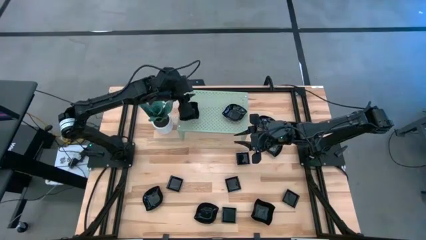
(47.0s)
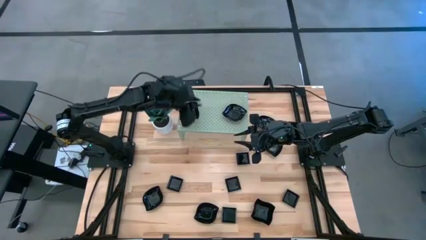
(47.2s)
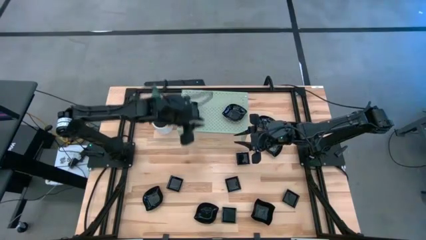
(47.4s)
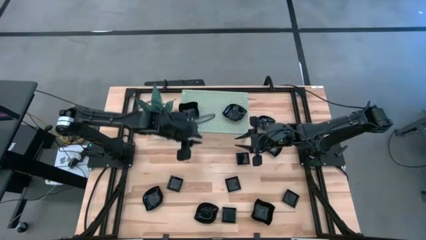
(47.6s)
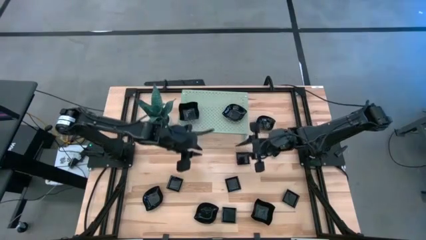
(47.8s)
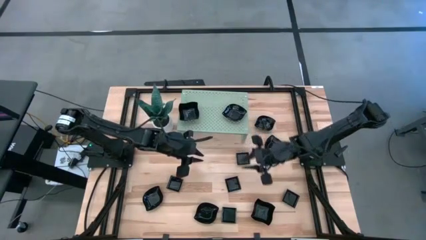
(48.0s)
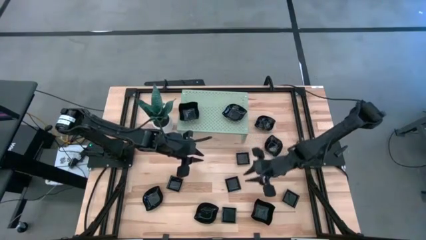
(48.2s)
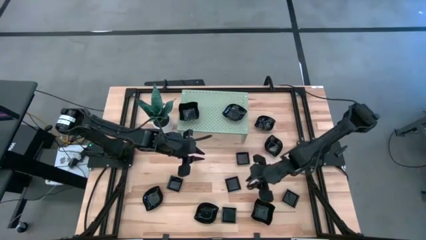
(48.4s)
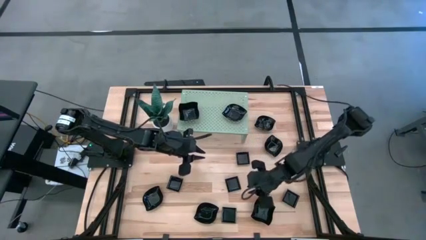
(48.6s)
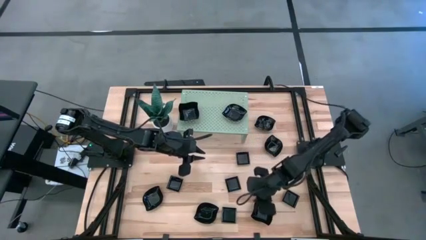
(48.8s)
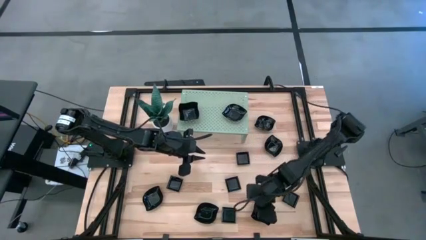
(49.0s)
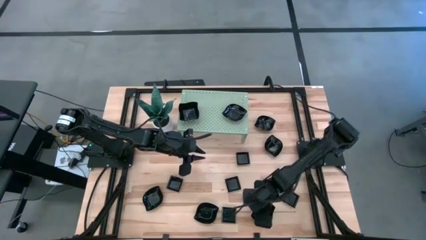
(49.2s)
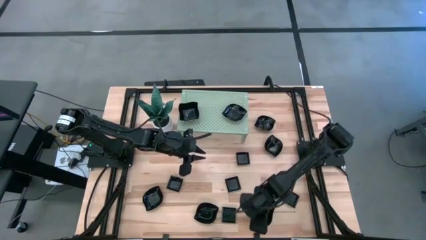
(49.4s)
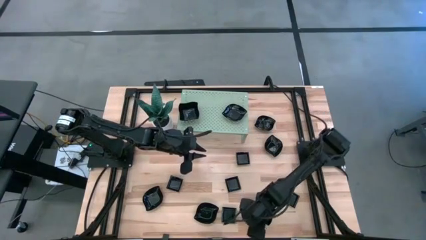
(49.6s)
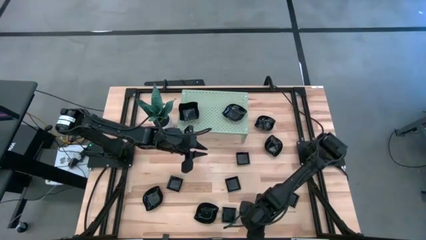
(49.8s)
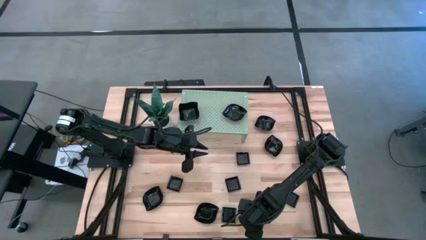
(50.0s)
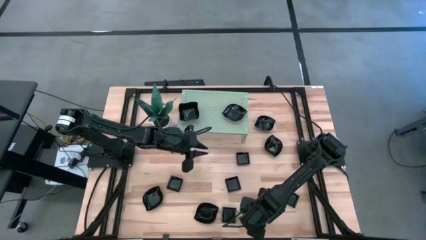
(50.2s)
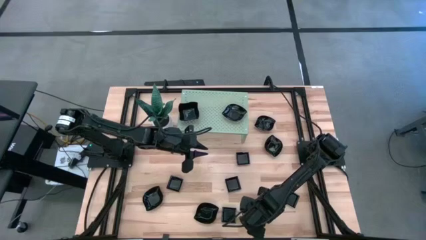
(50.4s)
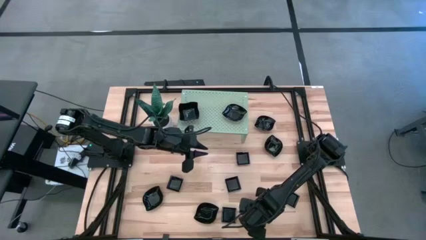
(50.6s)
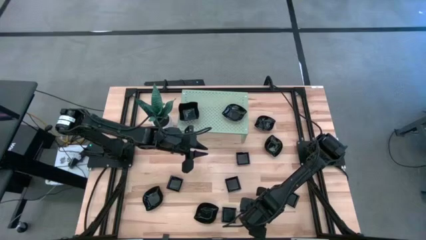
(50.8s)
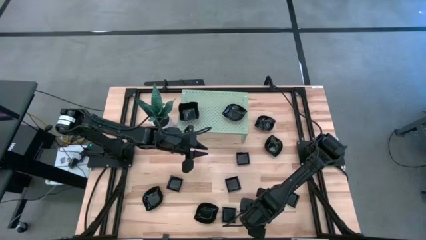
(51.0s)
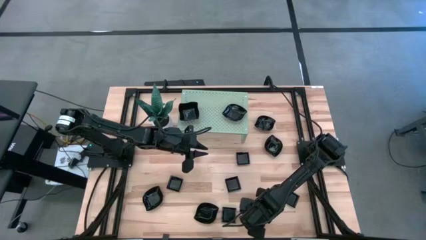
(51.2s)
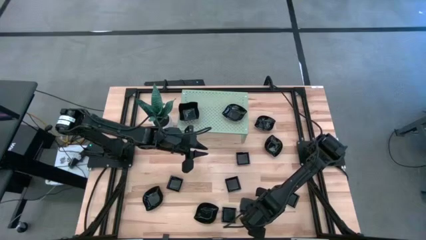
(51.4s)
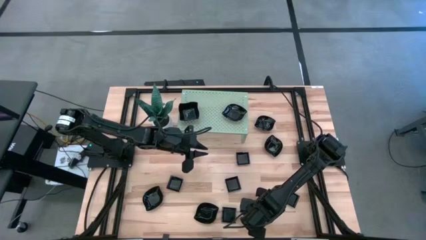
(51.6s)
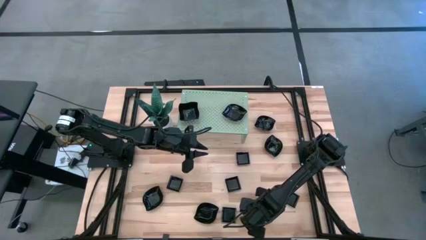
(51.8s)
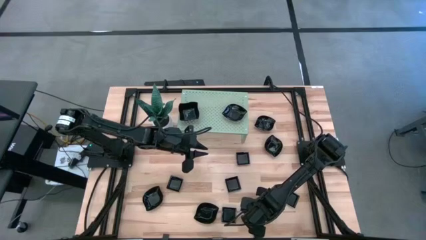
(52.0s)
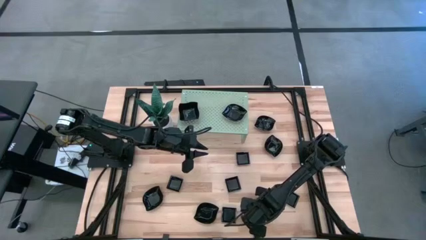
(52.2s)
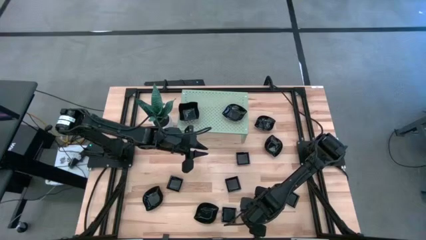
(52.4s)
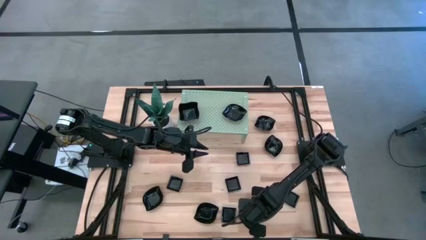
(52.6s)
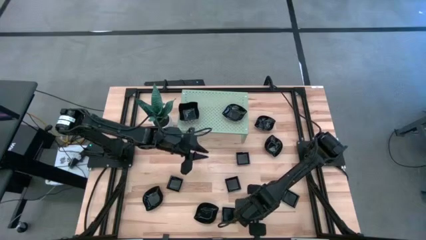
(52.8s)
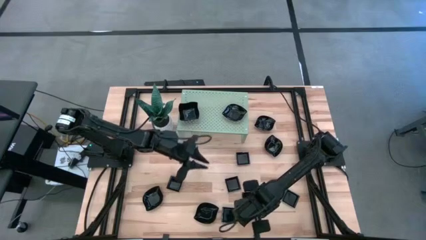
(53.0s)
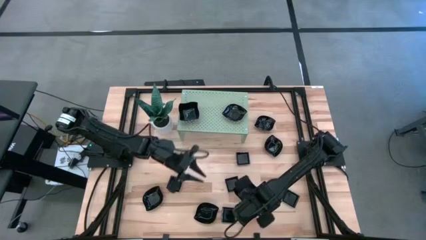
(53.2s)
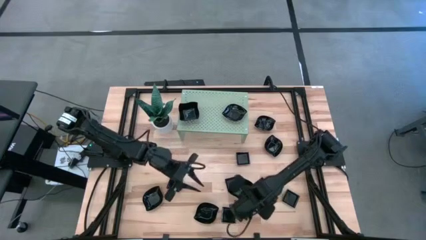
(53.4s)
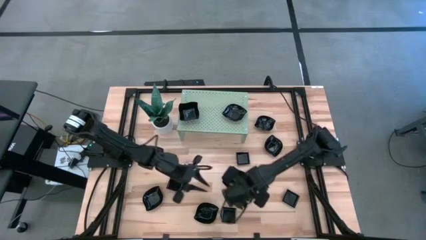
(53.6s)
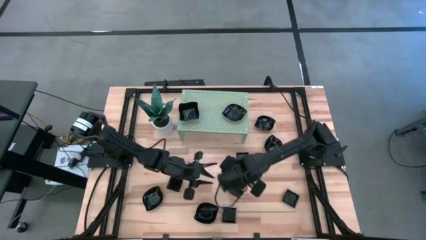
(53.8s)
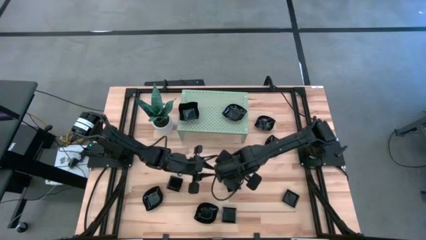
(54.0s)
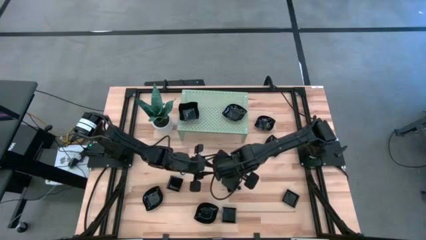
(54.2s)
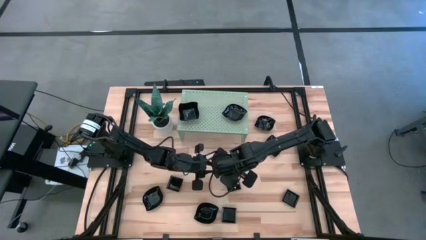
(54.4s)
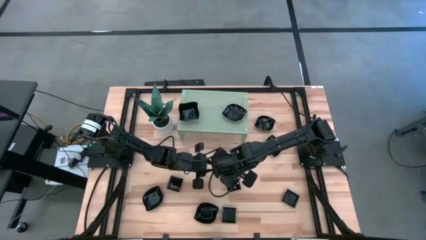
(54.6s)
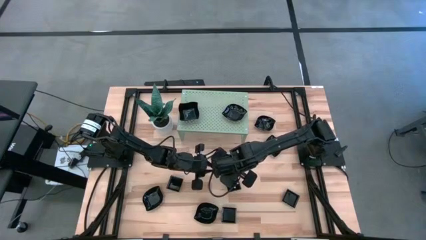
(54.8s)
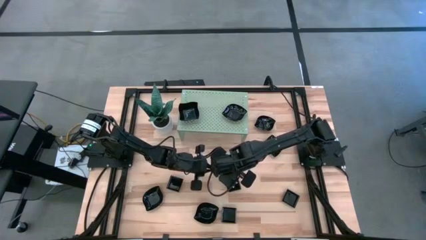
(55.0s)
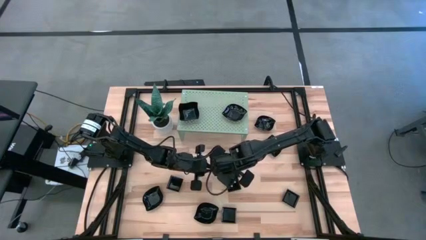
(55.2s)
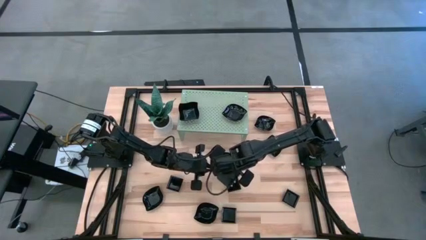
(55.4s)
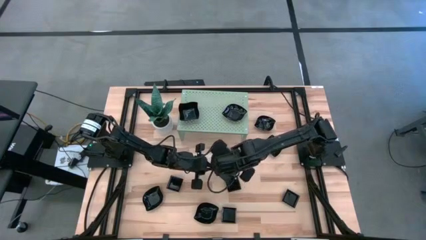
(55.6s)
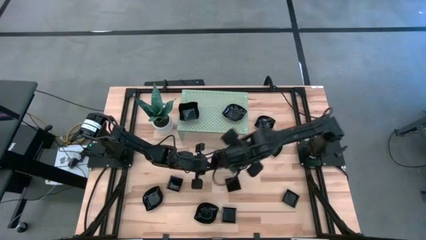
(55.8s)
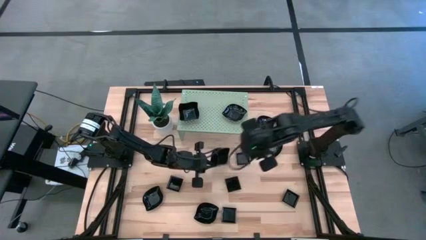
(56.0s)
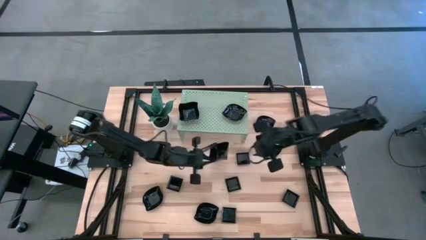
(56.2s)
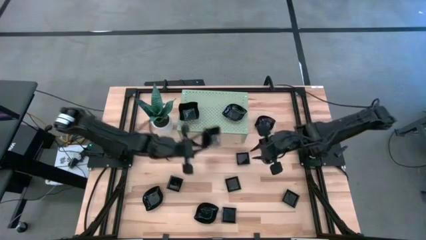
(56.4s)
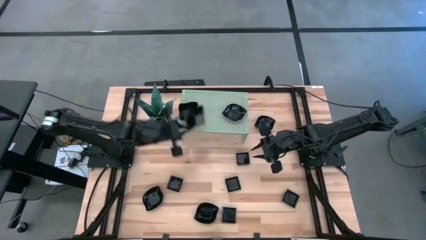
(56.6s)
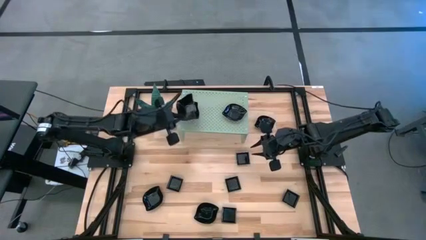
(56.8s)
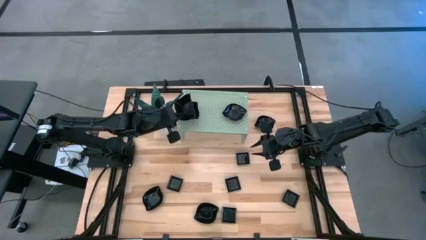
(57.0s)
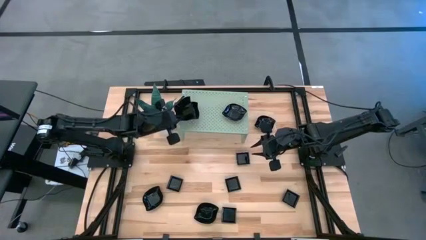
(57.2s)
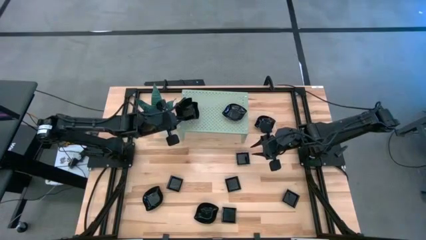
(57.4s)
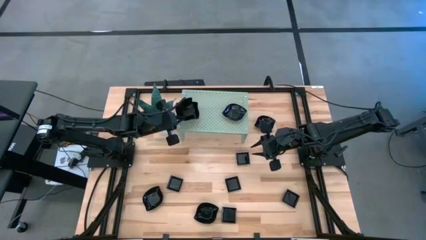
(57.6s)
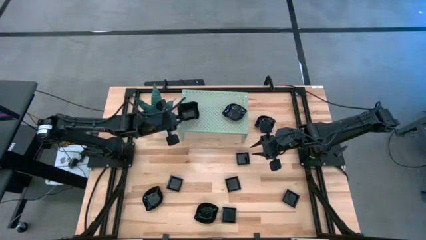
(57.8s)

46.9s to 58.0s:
Task: Pick & Place Mini shaped plates
Stack the distorted square plate on top of the other distorted square plate on the shelf

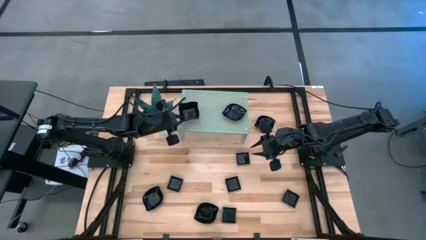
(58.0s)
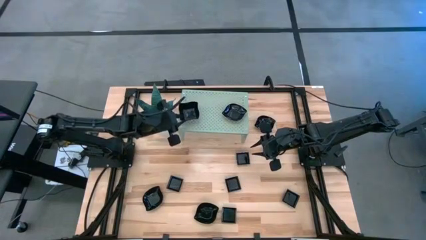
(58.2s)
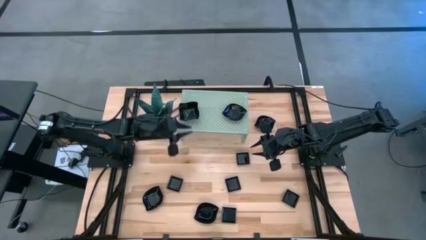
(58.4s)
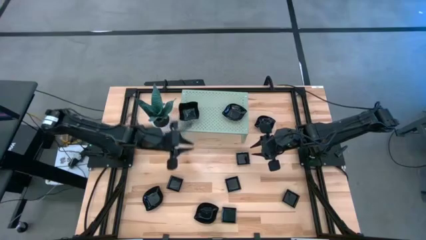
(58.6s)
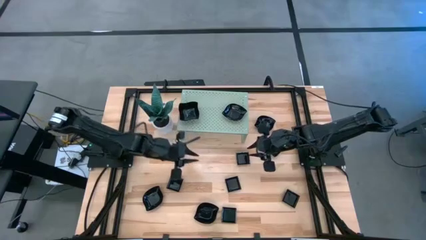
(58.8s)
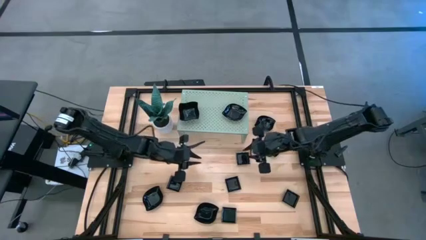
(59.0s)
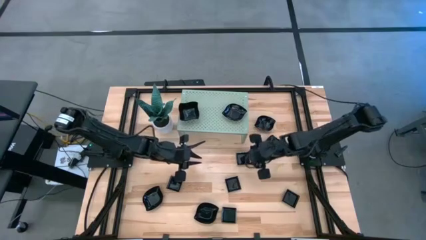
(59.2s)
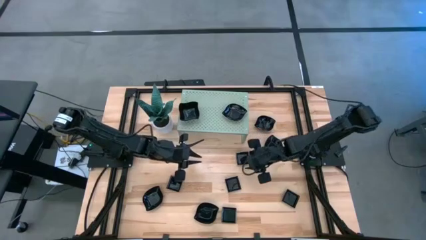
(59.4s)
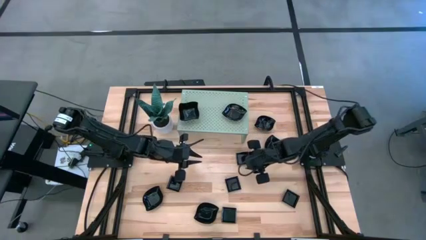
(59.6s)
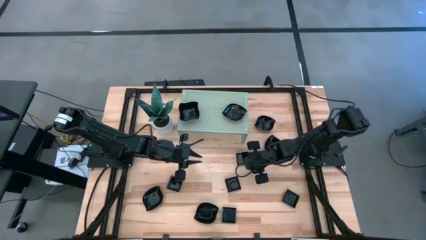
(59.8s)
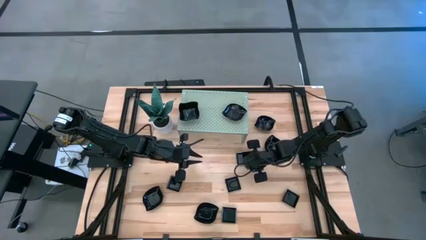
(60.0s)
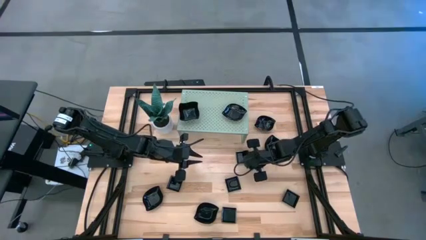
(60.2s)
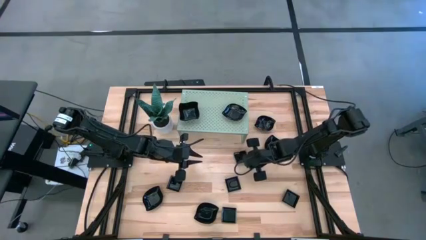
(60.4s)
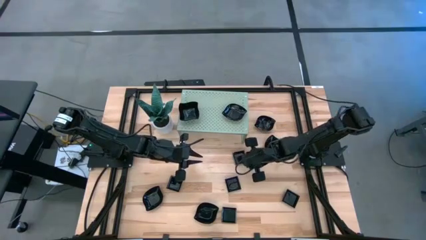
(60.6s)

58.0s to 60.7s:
Put the square plate on the shelf

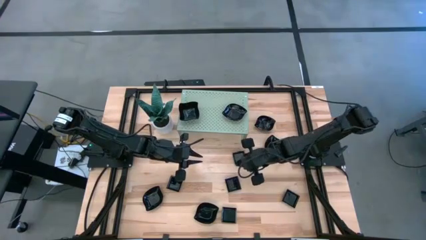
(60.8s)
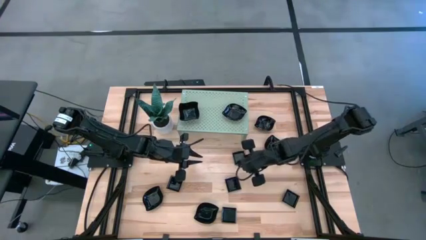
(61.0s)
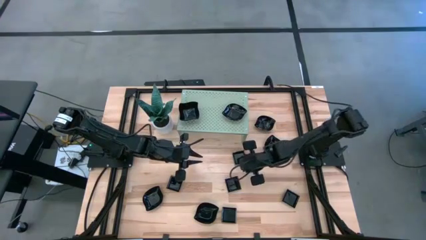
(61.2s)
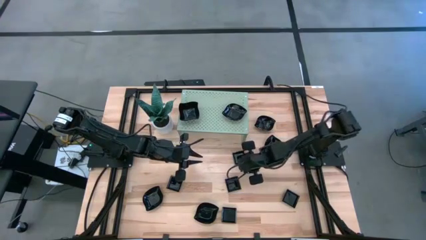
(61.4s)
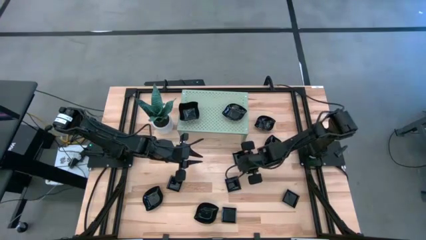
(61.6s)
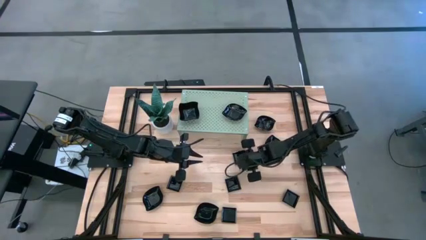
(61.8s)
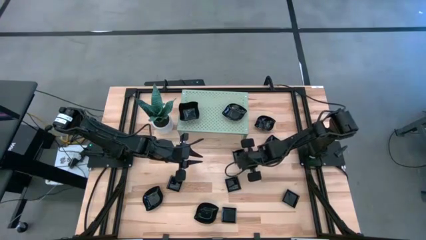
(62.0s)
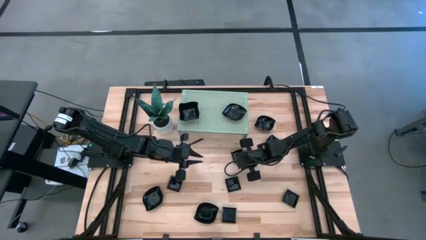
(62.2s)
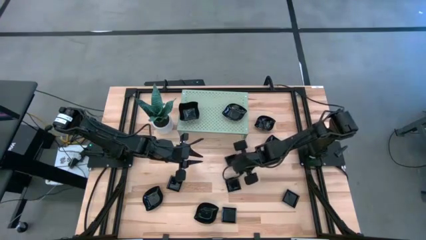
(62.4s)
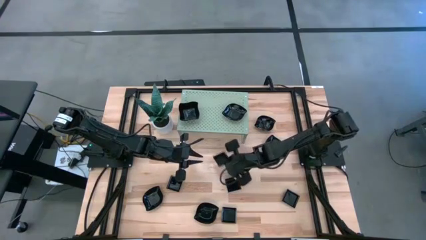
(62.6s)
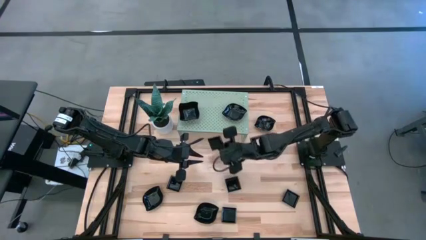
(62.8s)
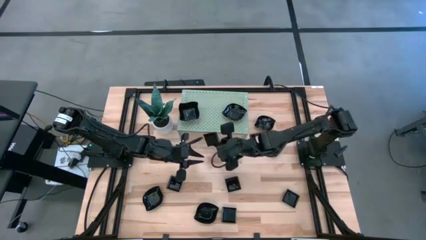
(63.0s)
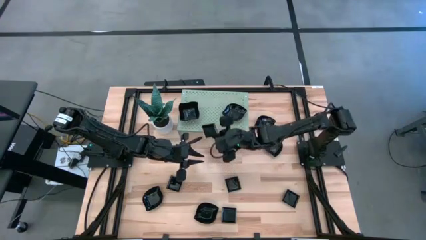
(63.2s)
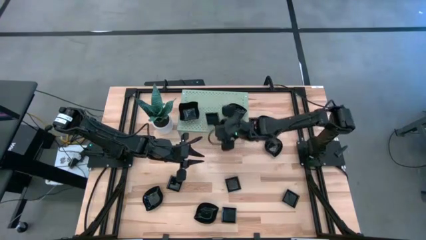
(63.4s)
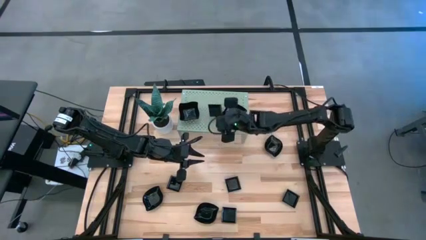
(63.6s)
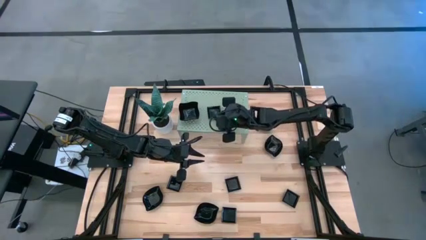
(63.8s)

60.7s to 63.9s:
Put the square plate on the shelf

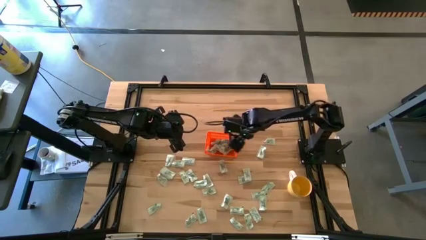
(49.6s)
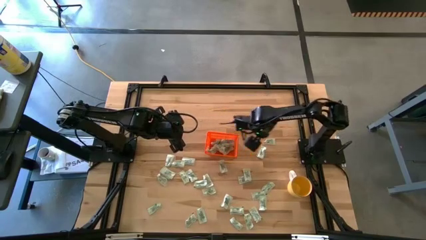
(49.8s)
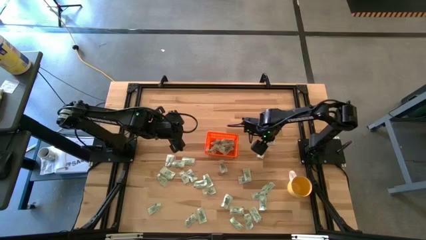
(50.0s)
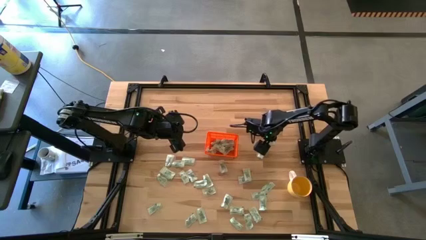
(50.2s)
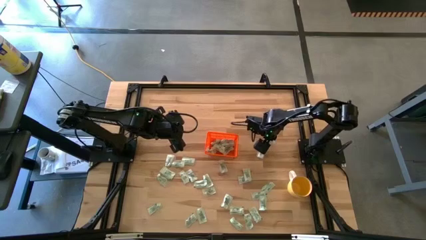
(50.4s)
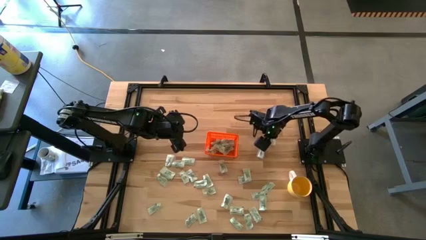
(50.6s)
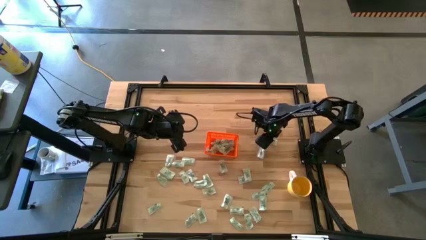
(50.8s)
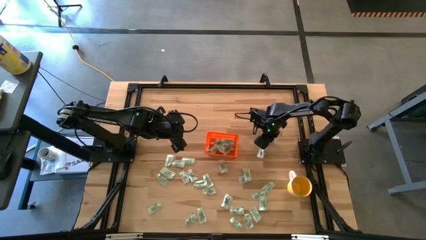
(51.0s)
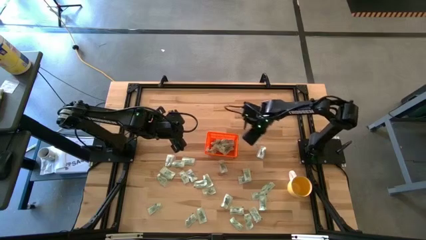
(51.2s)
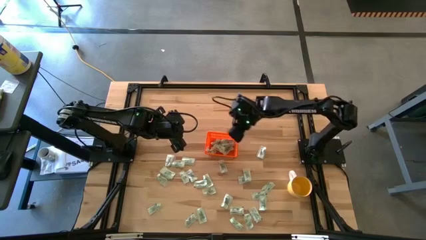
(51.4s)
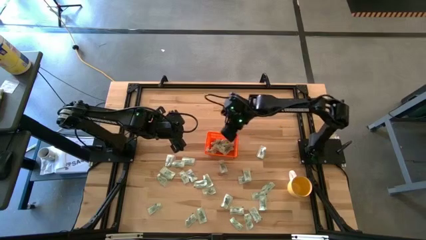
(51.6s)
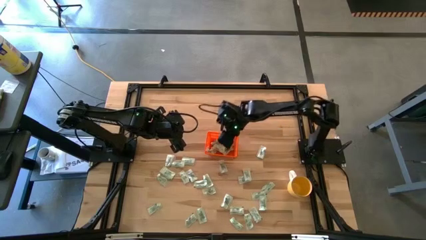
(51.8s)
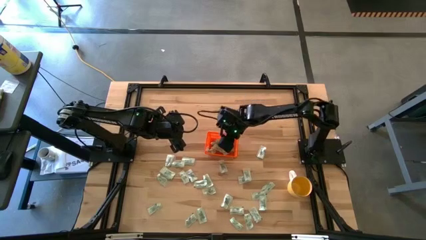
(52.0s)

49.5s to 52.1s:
Task: Pick and place Stevia / Truvia into bins
Put the light green stevia packet into the orange bin
